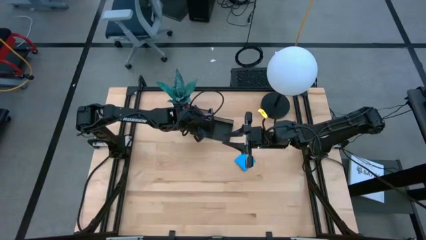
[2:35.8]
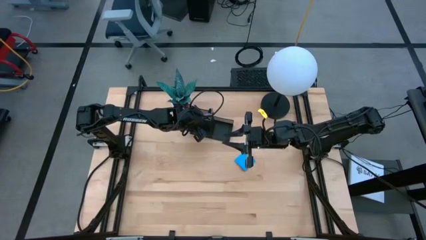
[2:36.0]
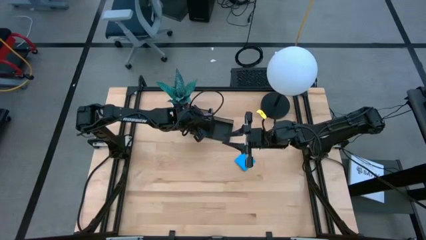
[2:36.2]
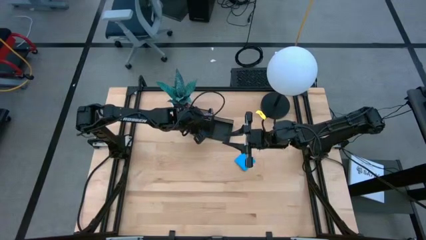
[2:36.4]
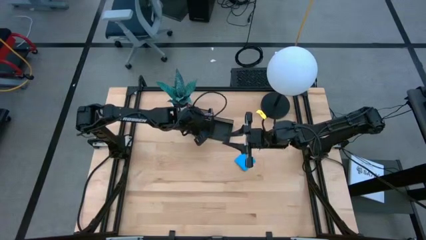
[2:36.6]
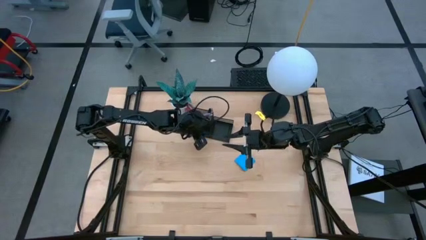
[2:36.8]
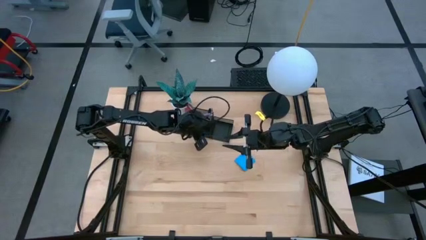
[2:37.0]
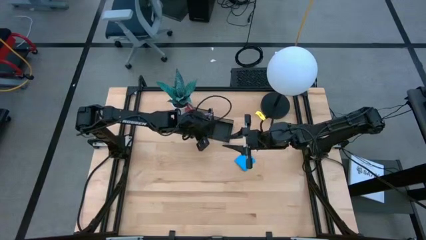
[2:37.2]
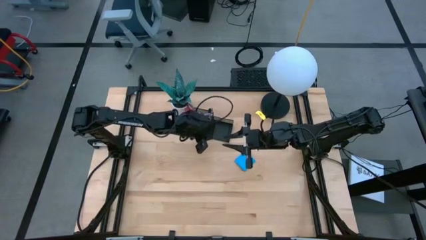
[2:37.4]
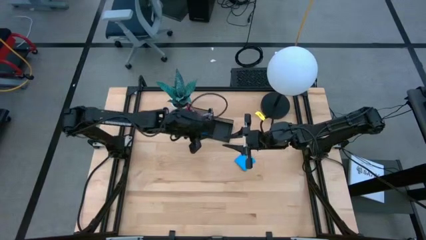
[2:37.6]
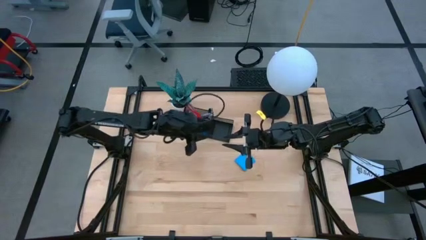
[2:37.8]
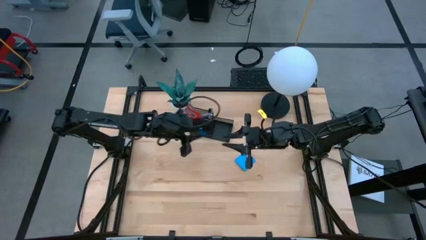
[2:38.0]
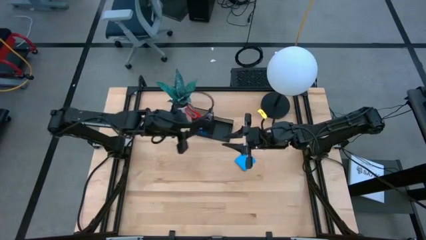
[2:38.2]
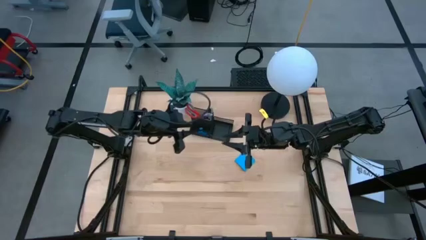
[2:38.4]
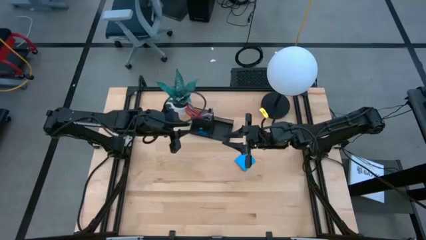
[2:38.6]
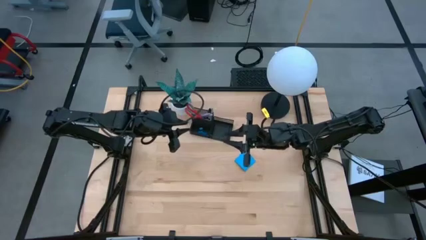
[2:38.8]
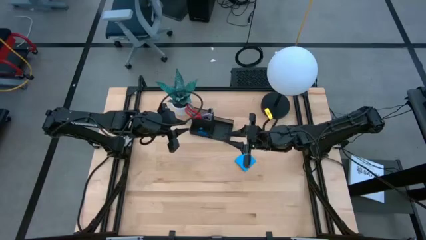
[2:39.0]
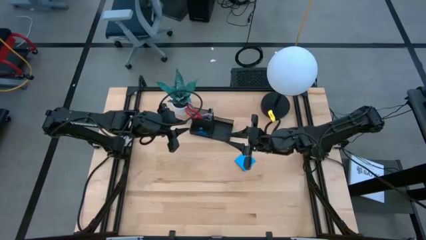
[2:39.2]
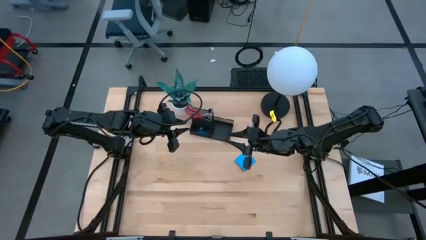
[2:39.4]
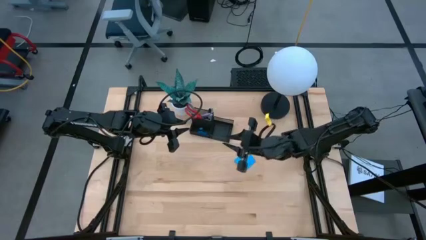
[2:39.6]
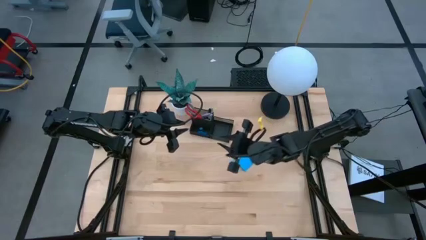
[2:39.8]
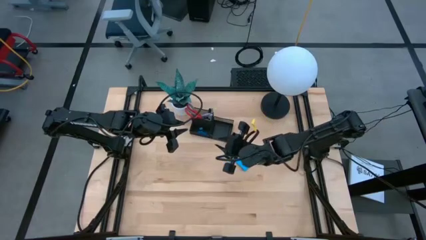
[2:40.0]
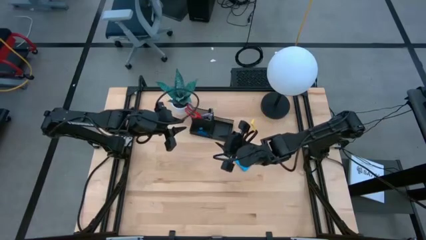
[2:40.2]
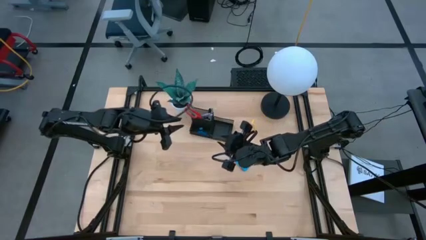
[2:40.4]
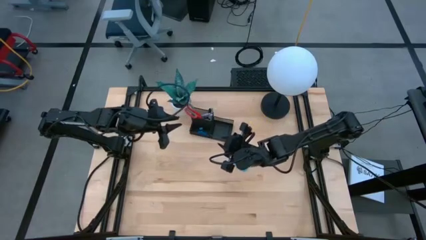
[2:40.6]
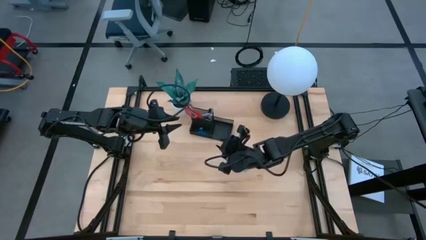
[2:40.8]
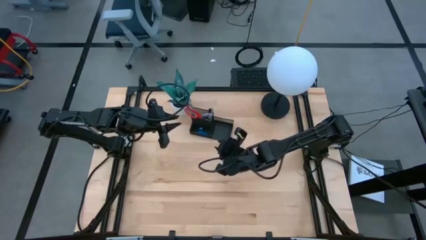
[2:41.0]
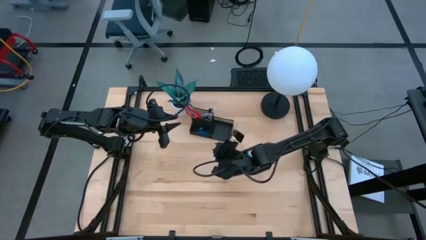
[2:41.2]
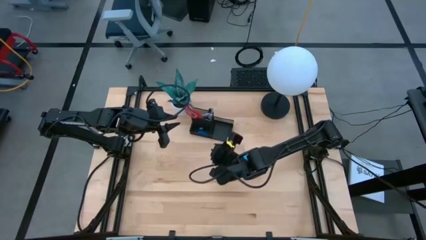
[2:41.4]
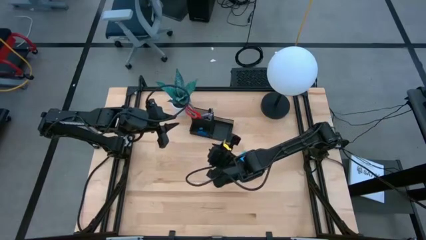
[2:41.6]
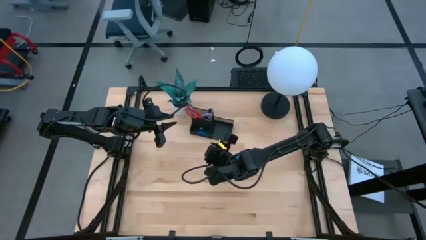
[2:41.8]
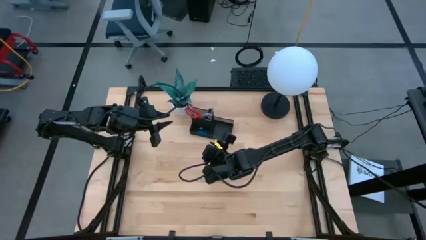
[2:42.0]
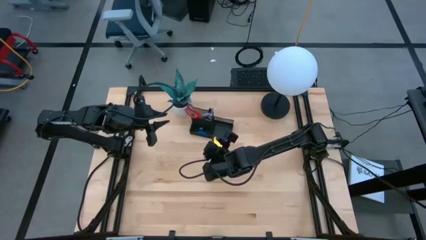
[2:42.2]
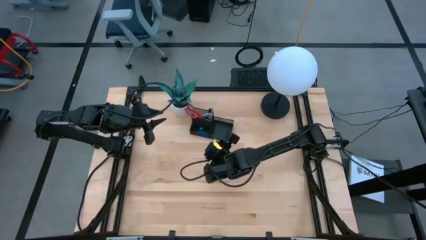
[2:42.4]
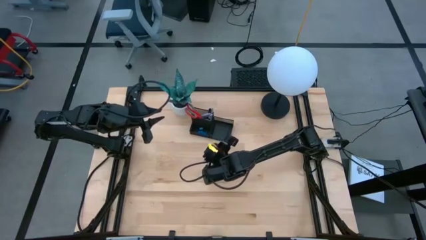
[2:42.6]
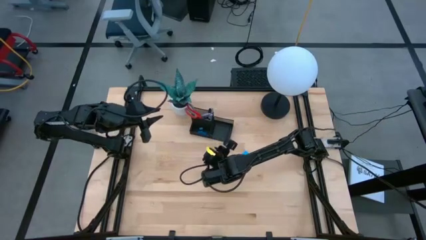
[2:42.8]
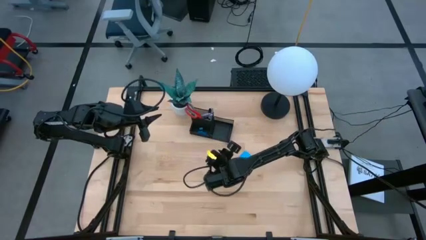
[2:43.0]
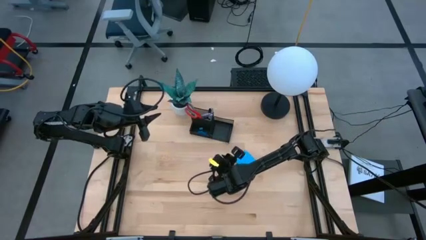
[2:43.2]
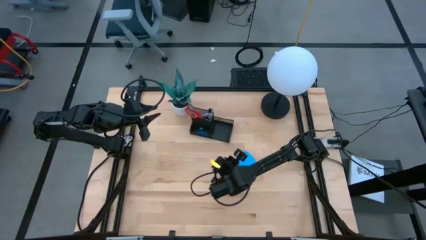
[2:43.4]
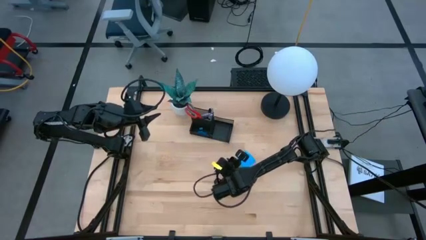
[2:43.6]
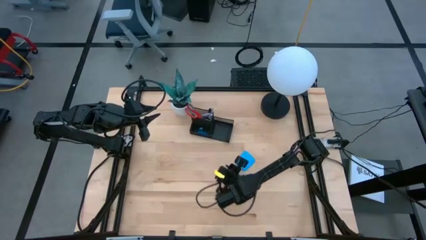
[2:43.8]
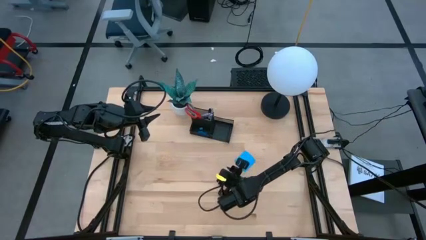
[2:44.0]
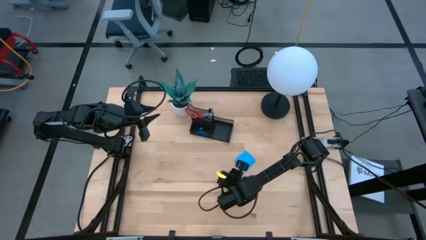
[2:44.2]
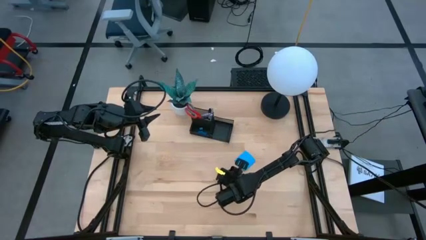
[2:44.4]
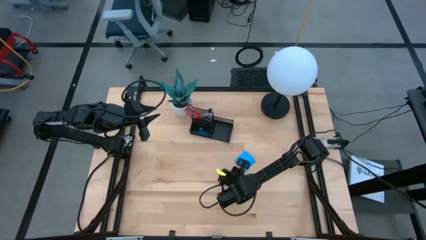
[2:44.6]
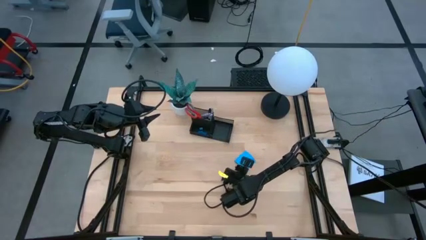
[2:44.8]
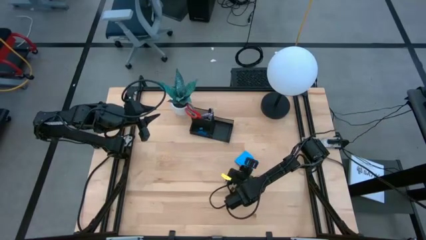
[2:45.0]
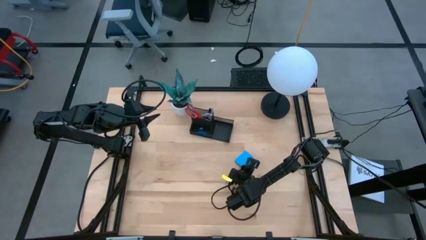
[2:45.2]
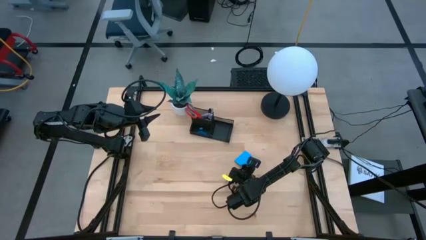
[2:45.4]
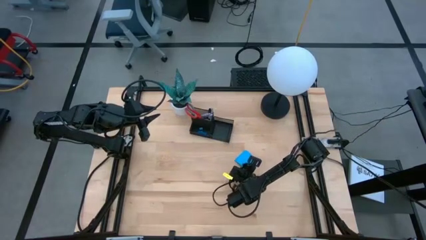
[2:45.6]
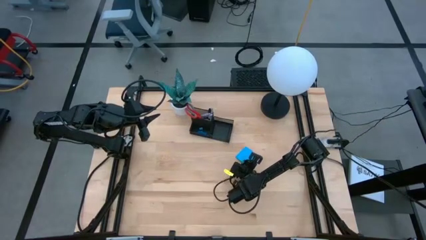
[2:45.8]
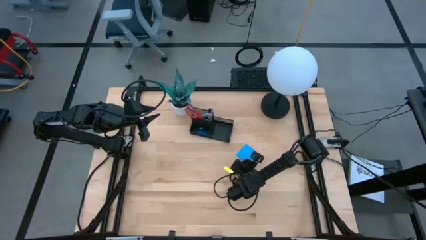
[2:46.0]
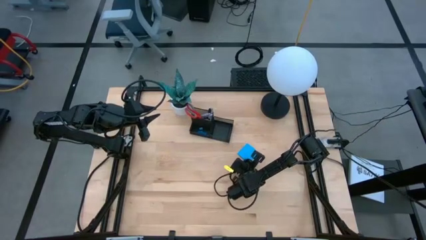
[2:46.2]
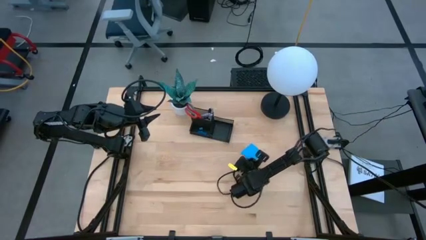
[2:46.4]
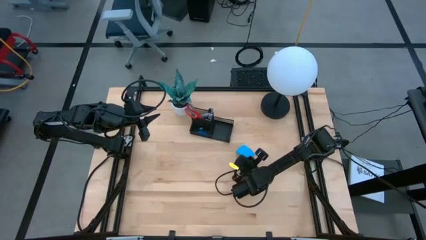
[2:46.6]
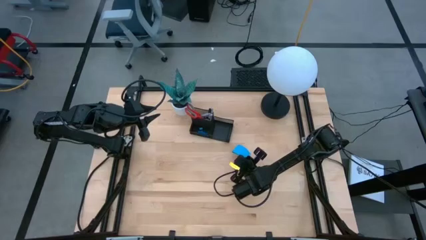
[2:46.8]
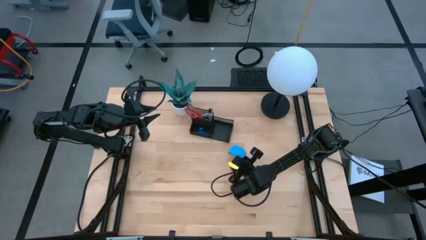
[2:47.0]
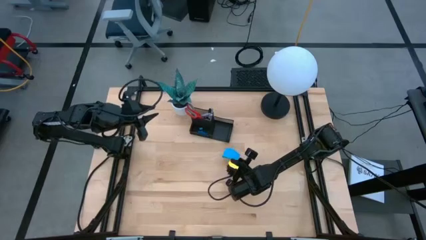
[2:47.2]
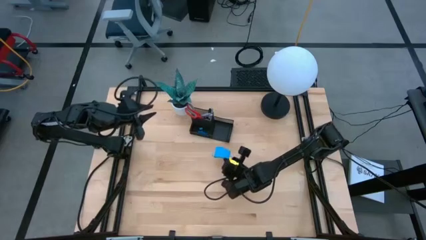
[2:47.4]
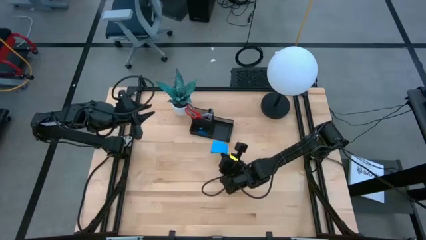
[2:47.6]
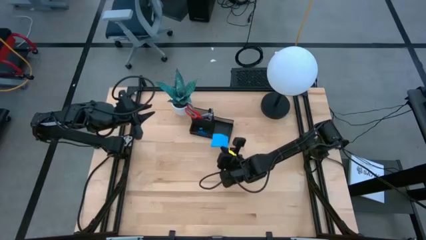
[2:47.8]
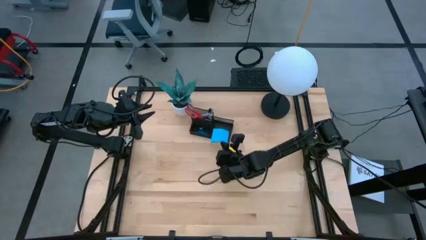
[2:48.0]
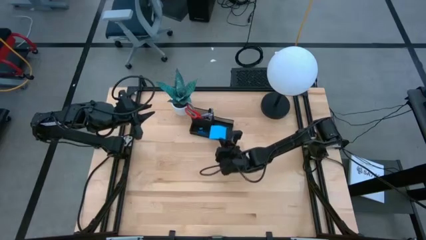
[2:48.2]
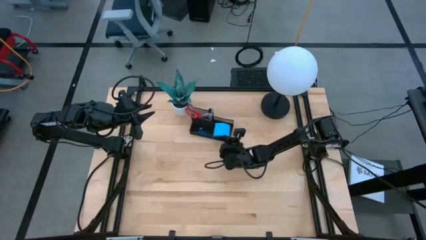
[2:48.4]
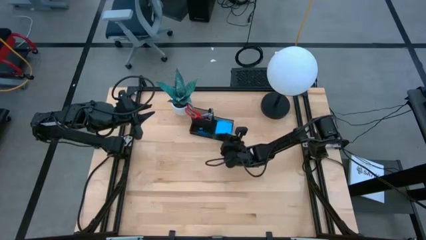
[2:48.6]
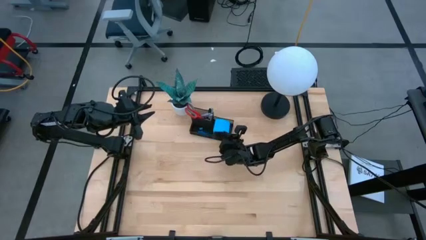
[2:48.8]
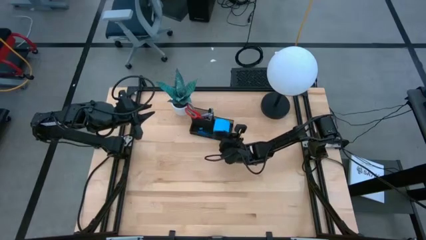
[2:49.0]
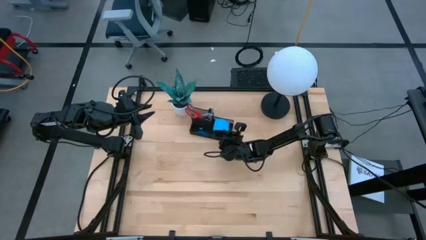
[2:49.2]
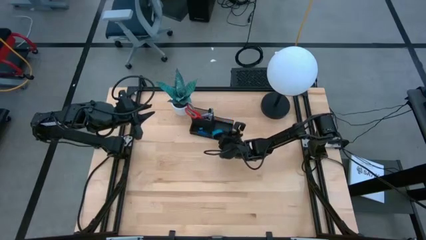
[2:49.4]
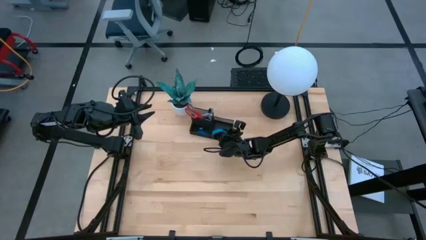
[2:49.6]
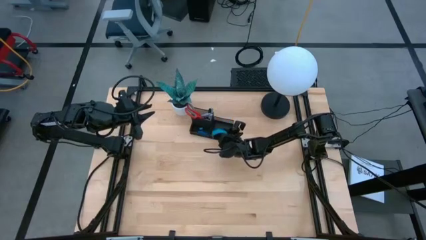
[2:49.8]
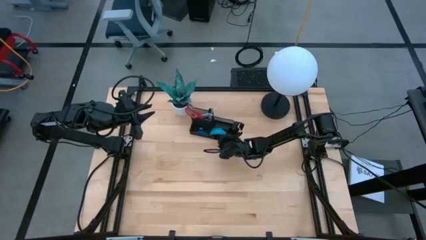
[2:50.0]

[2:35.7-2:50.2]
Task: Pick and place office supplies into organizer
Put the blue paper into the black desk organizer

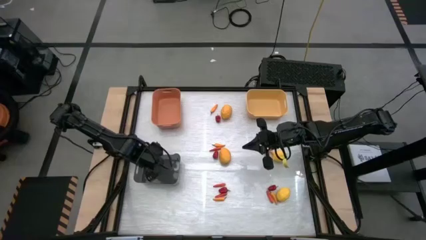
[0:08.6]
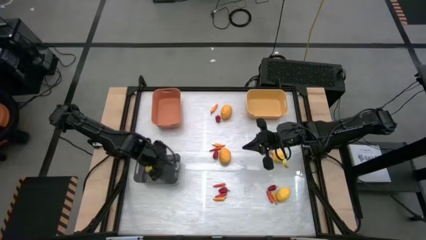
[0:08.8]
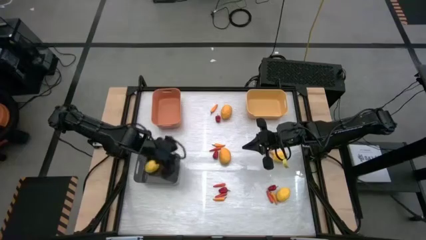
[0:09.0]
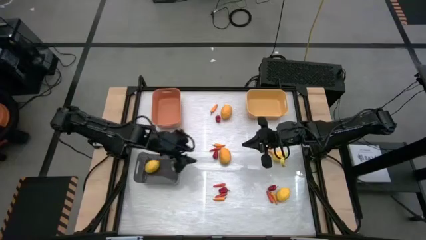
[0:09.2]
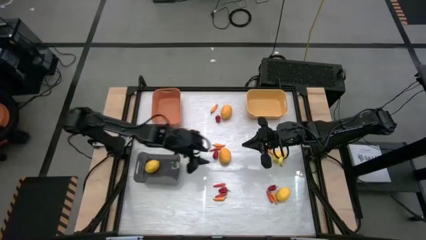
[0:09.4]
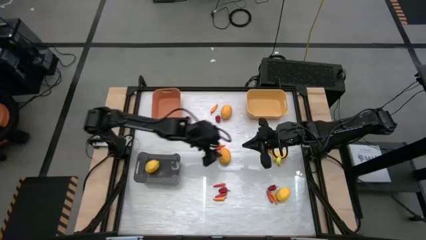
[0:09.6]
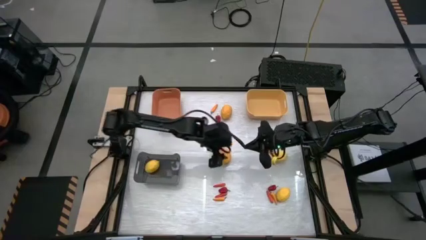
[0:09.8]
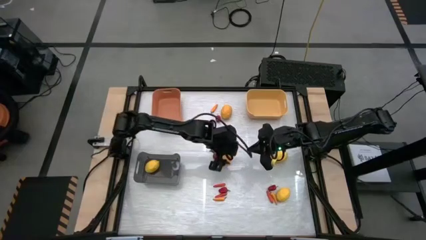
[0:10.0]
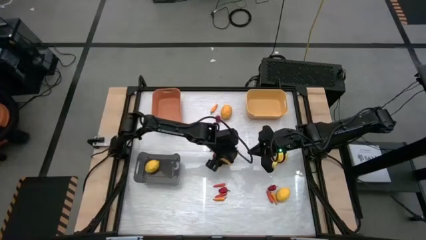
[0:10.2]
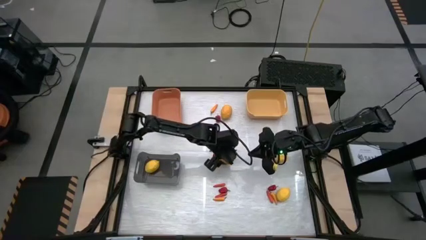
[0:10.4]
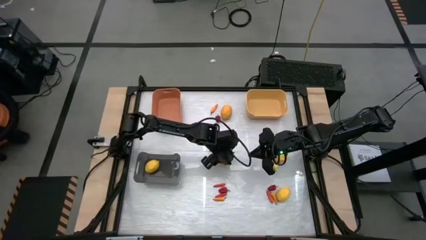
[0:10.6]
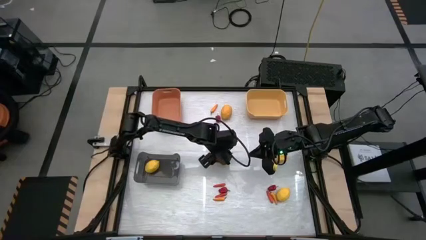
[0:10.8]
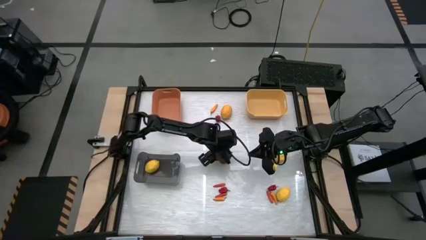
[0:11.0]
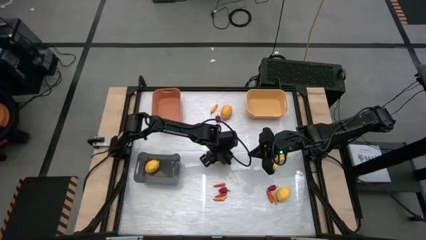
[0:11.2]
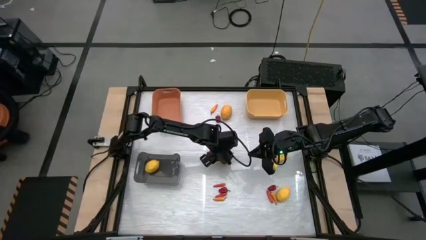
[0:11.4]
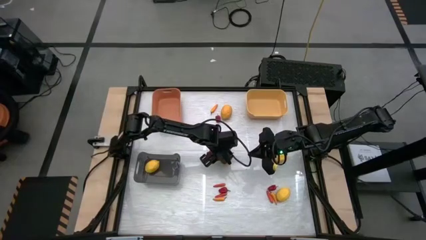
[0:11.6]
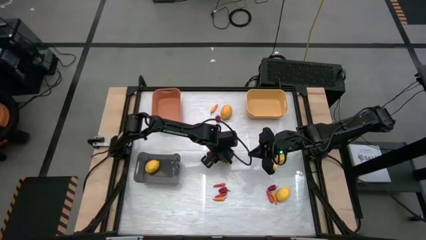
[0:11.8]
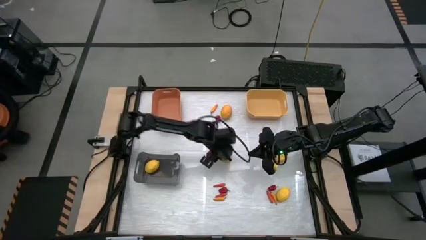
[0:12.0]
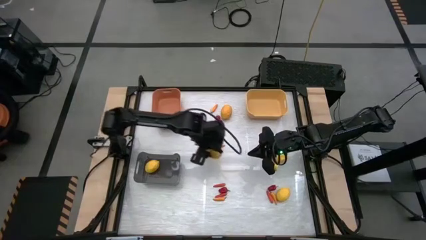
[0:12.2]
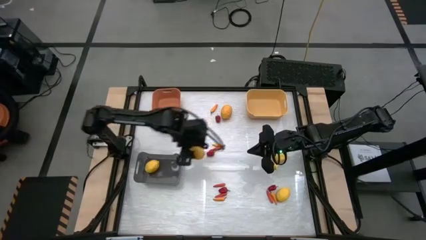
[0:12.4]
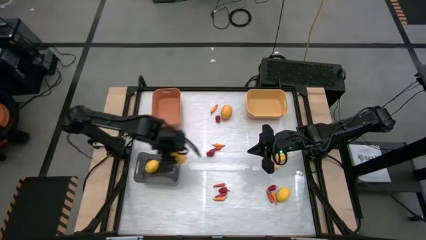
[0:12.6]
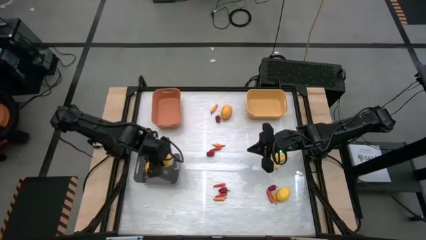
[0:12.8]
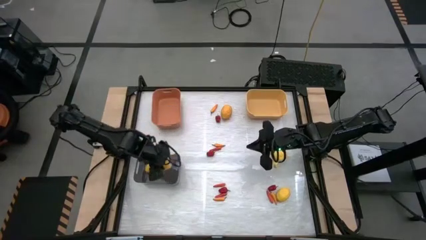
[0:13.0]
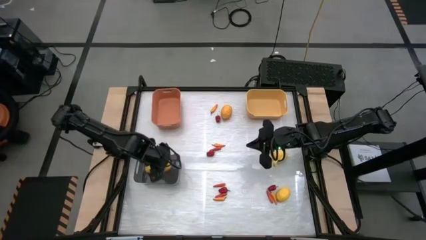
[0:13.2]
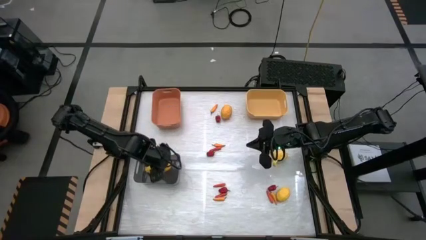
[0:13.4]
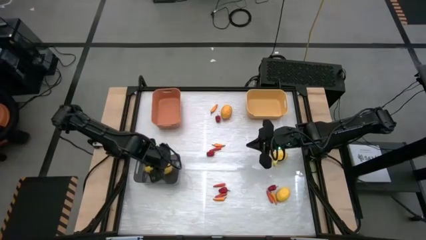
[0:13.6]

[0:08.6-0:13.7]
Task: Sort produce into baskets
Put the yellow lemon into the black bin
